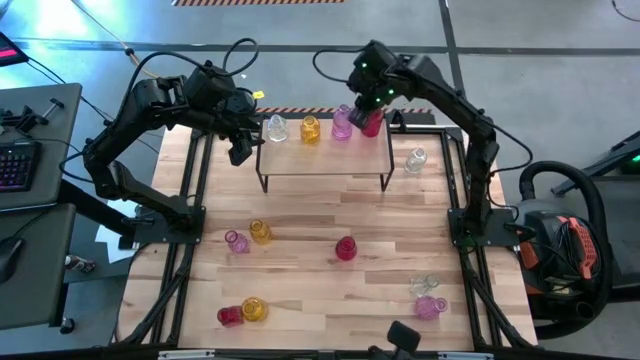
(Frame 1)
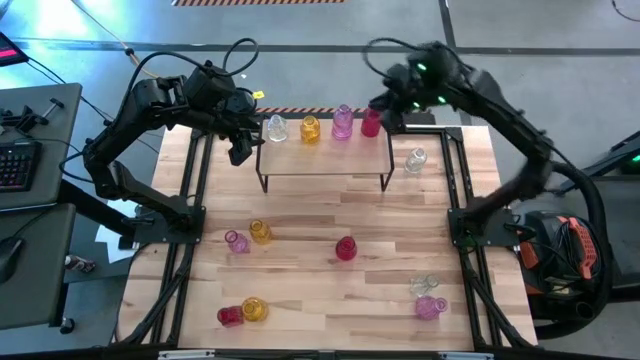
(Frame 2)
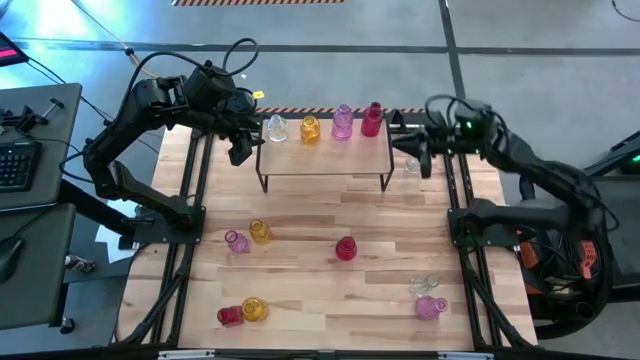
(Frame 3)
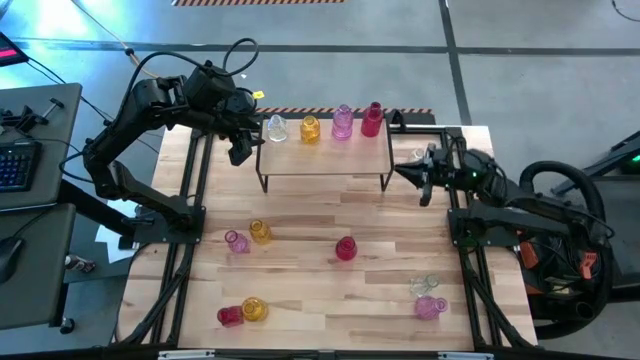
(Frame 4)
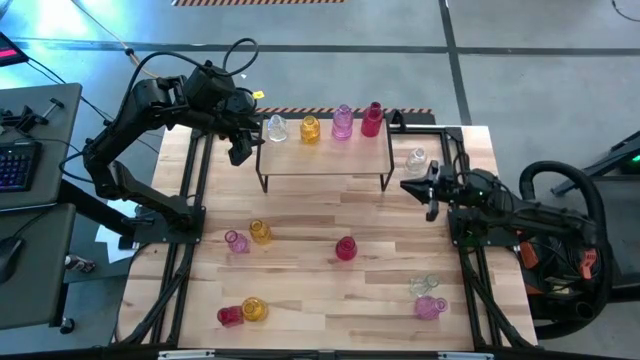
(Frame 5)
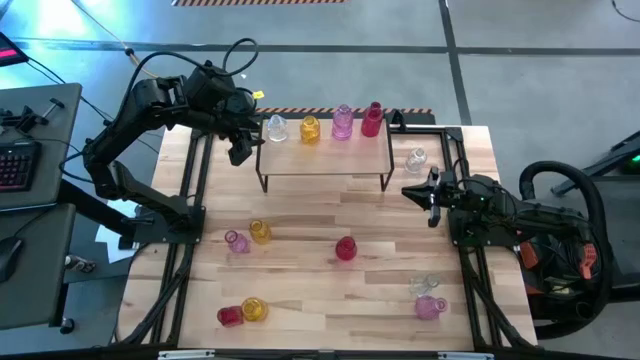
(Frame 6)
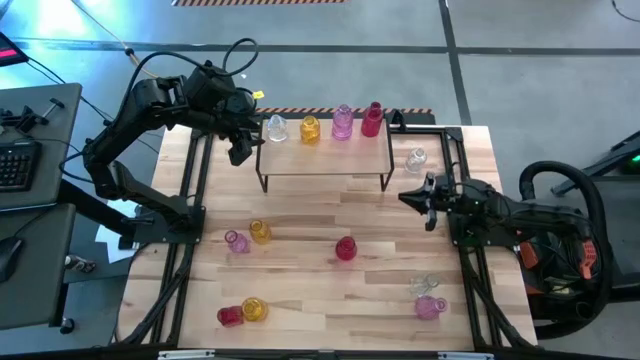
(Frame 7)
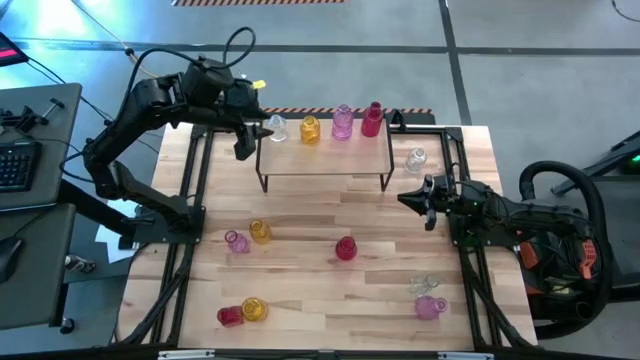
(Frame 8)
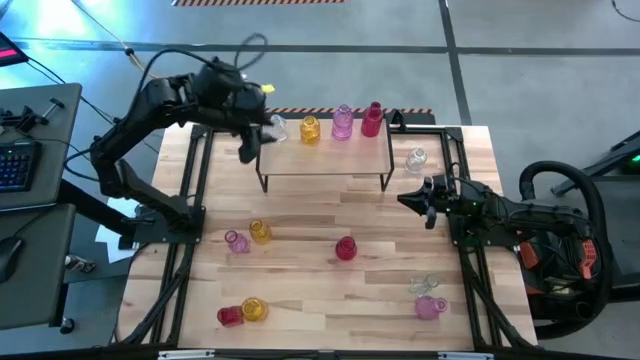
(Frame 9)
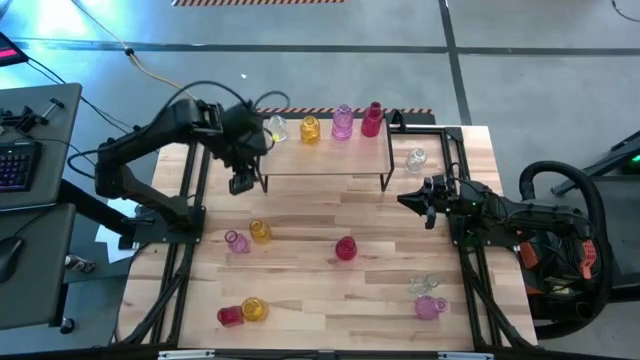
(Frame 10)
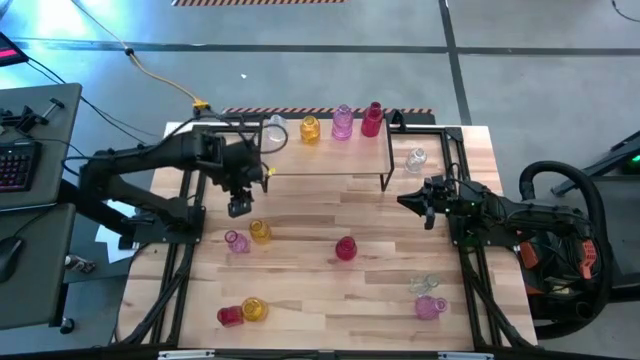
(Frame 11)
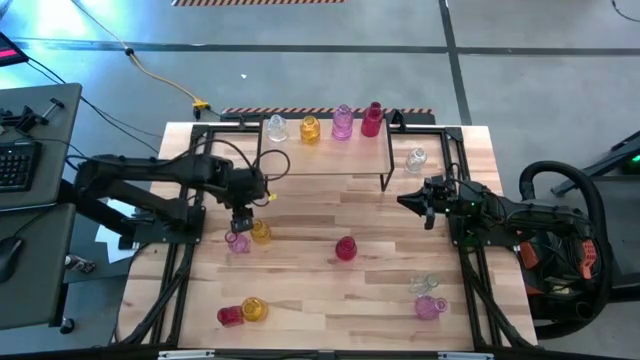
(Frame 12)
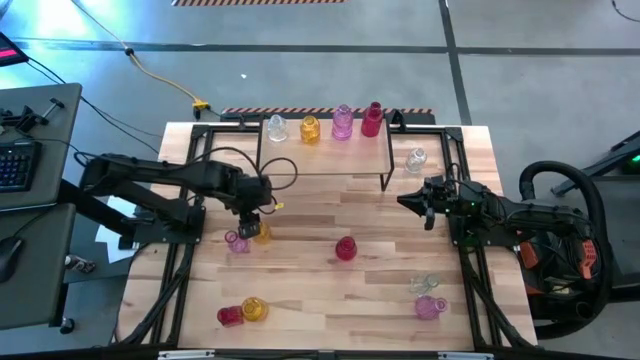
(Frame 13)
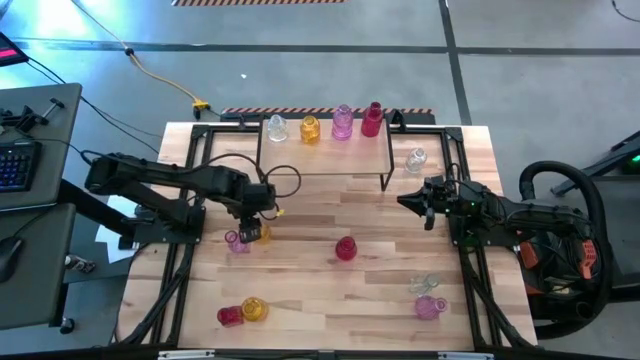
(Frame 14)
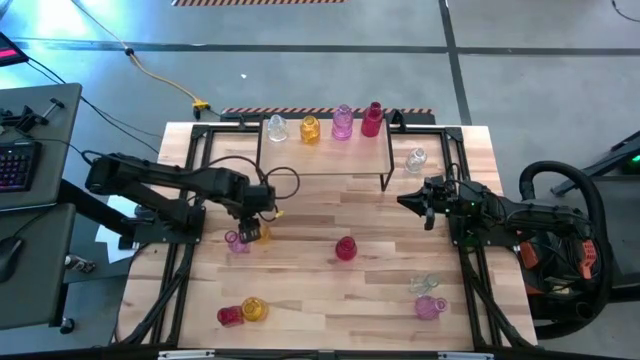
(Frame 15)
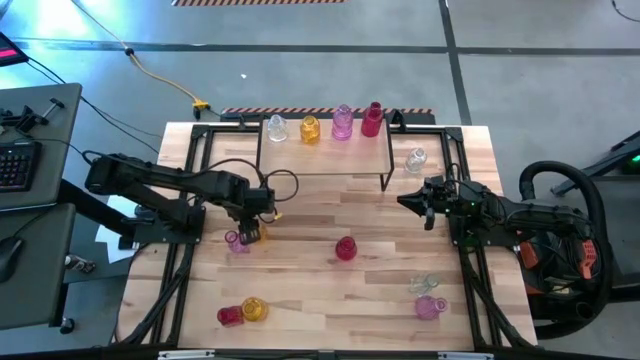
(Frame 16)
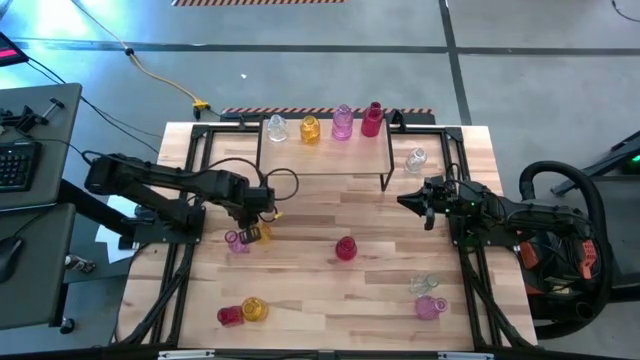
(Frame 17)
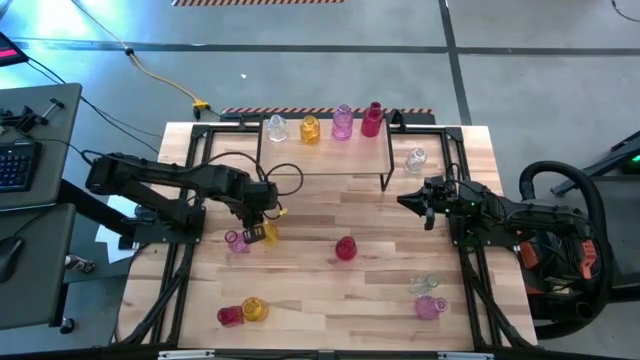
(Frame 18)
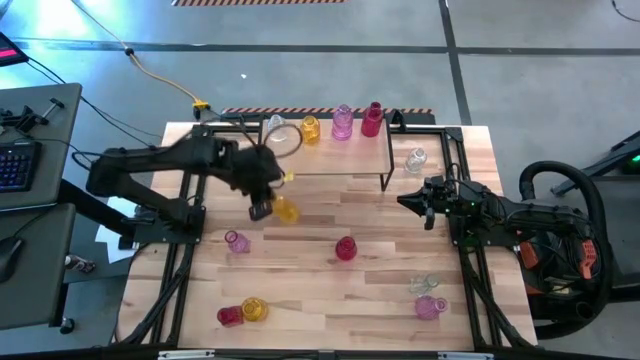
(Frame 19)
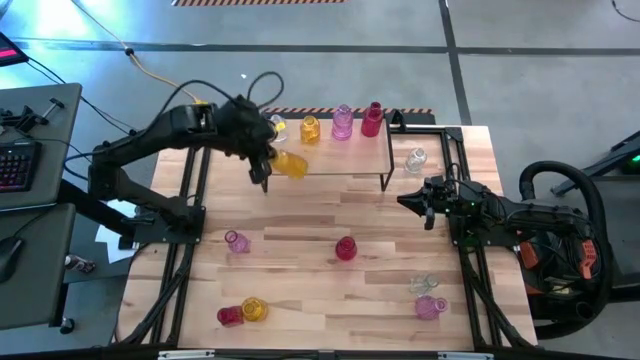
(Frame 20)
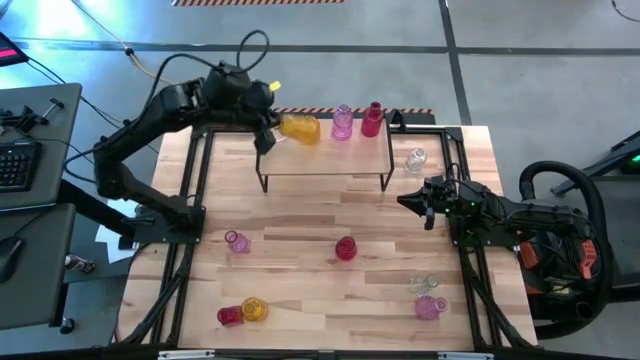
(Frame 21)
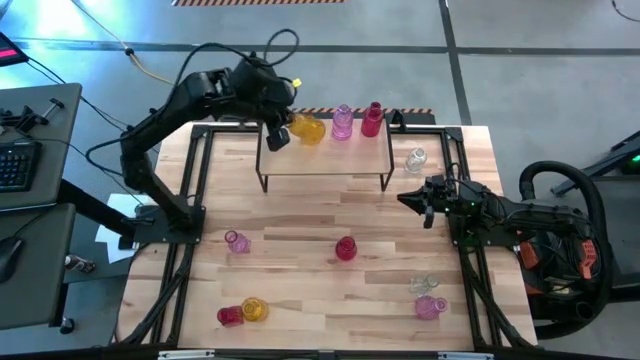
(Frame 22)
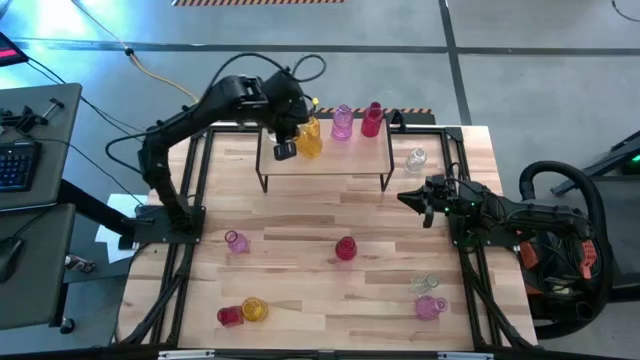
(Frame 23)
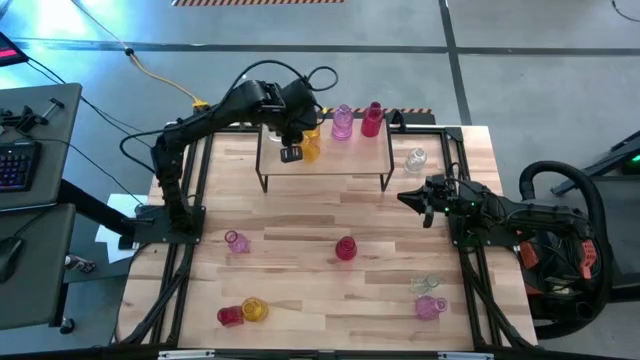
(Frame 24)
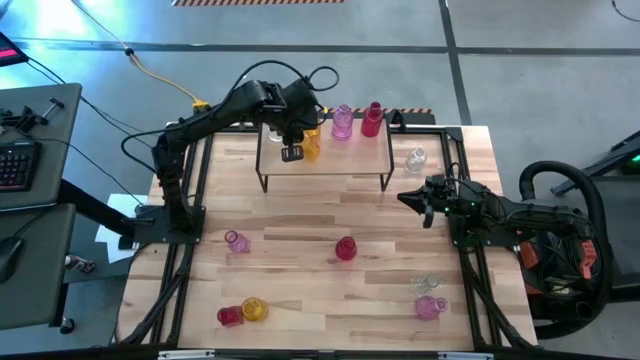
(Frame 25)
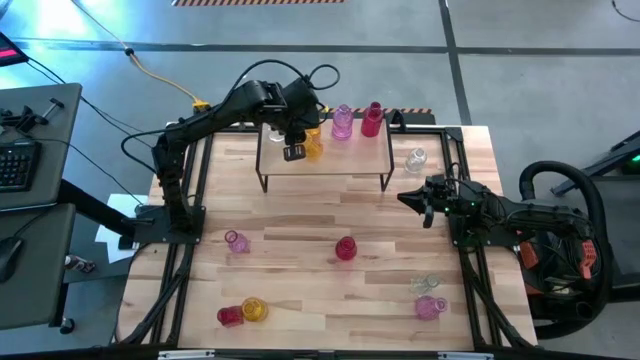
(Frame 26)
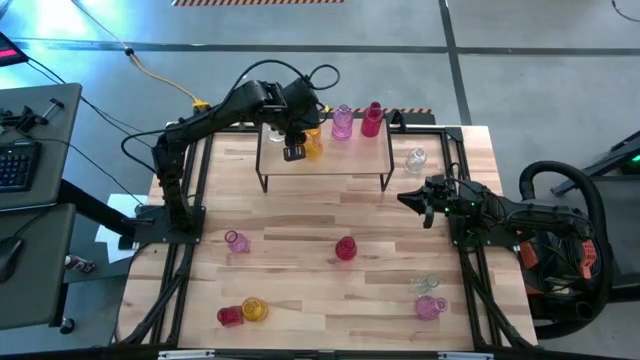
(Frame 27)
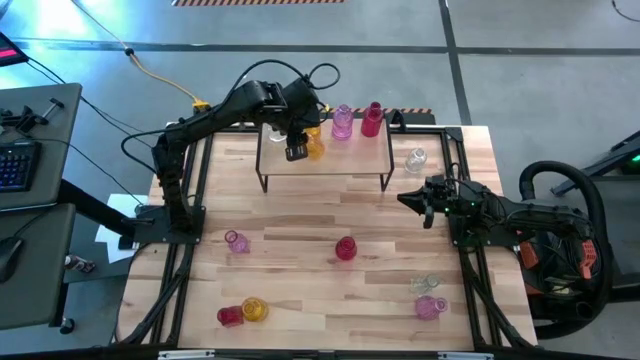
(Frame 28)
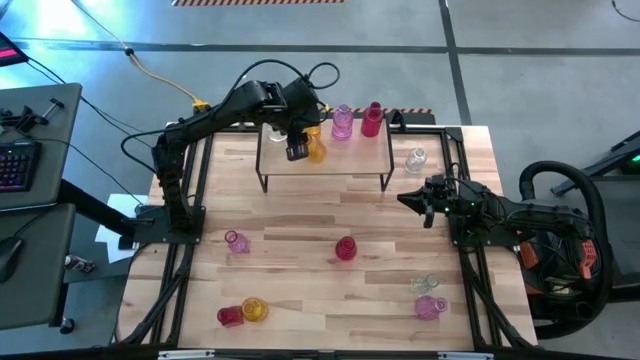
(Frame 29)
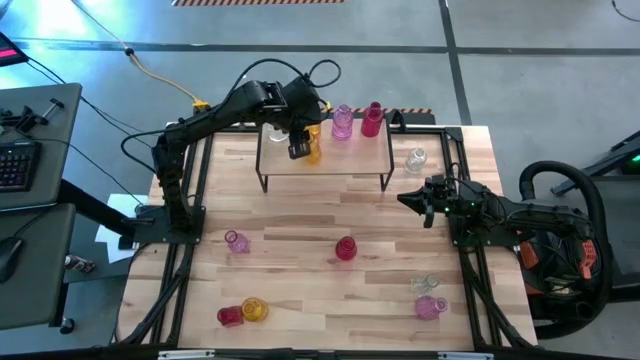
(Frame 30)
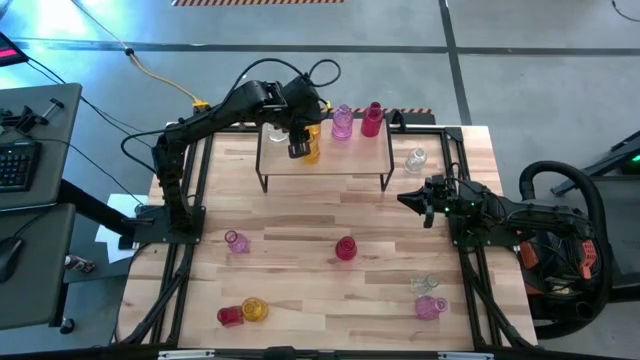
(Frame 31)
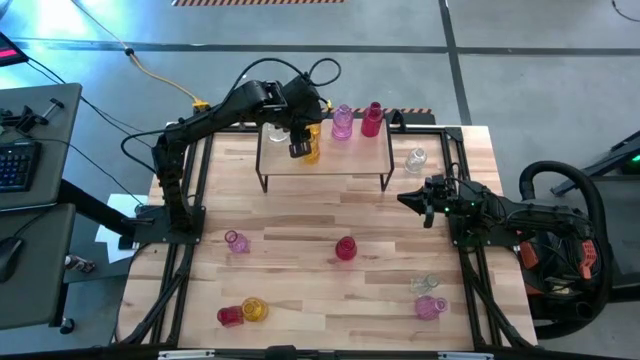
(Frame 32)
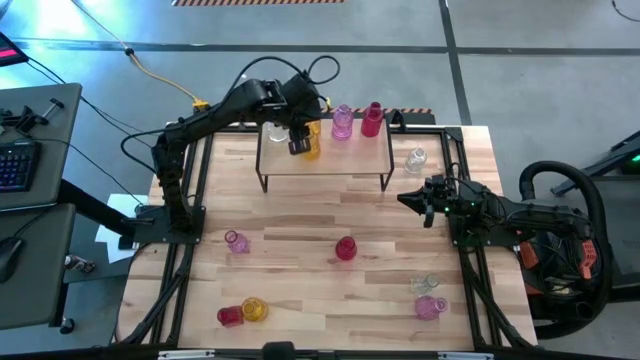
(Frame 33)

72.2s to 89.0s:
Task: sort vases onto shelf
Put the top yellow vase aligned with the other yellow vase on the shelf

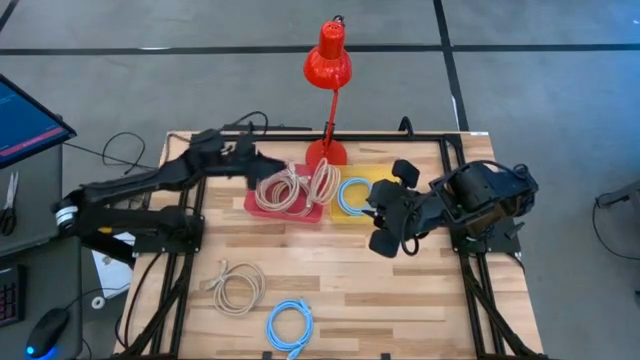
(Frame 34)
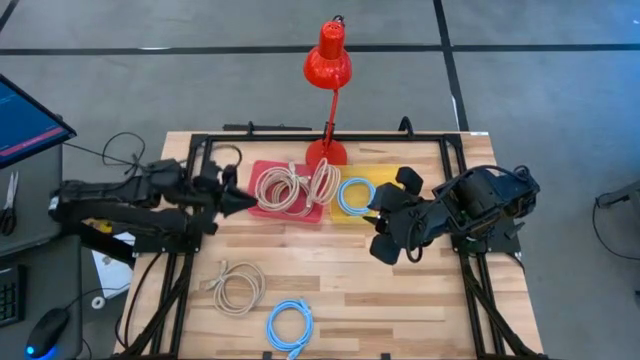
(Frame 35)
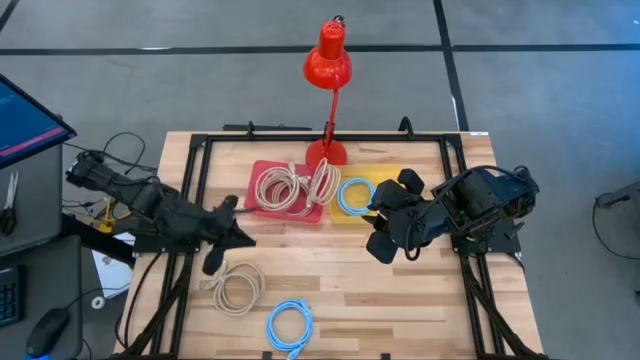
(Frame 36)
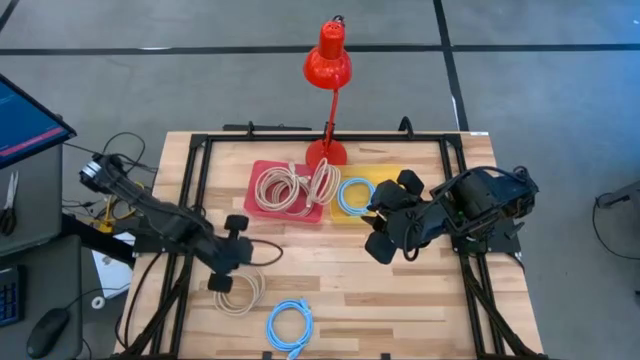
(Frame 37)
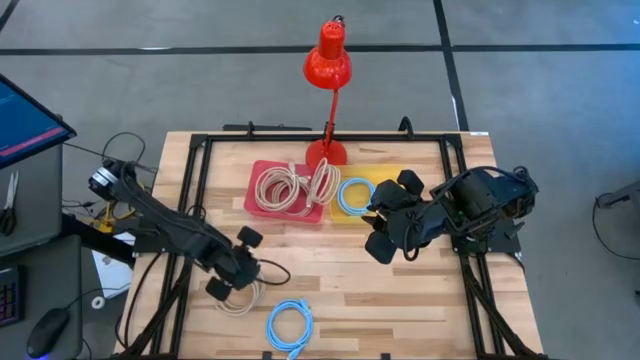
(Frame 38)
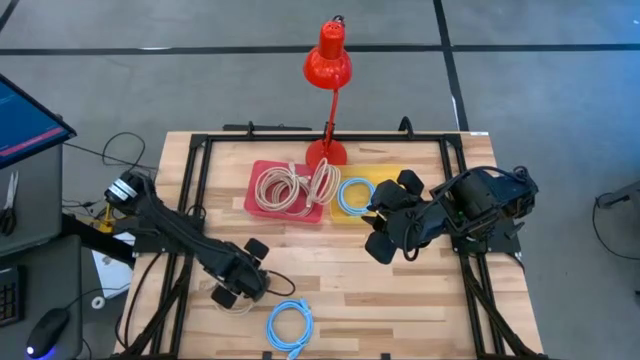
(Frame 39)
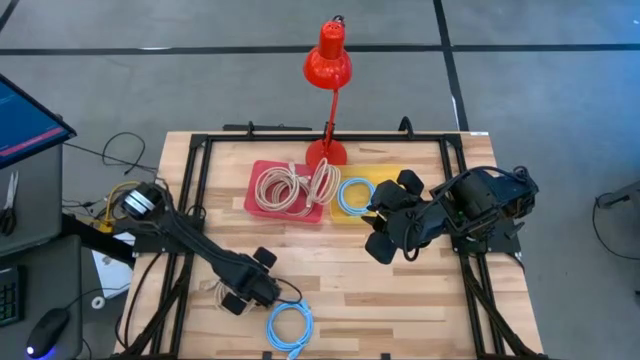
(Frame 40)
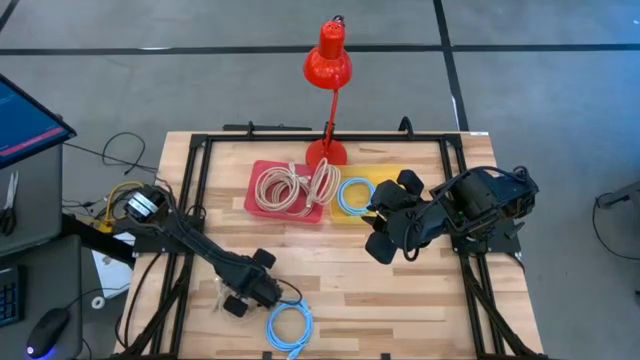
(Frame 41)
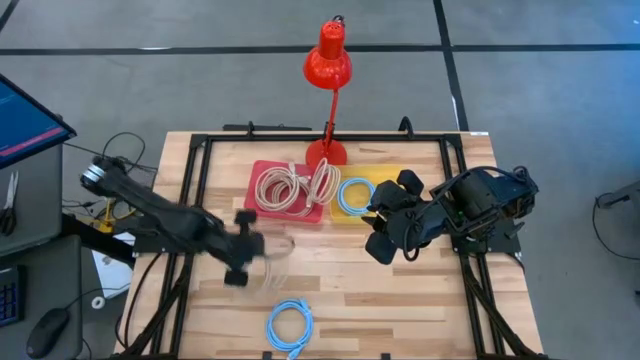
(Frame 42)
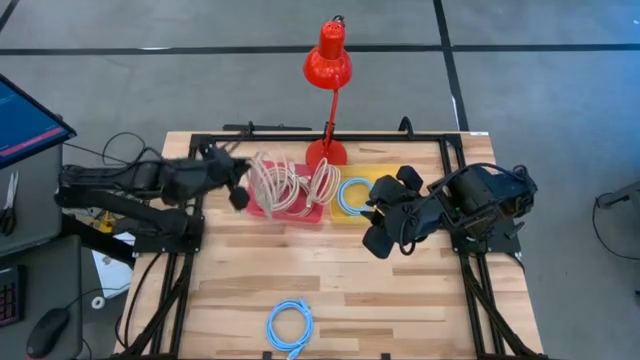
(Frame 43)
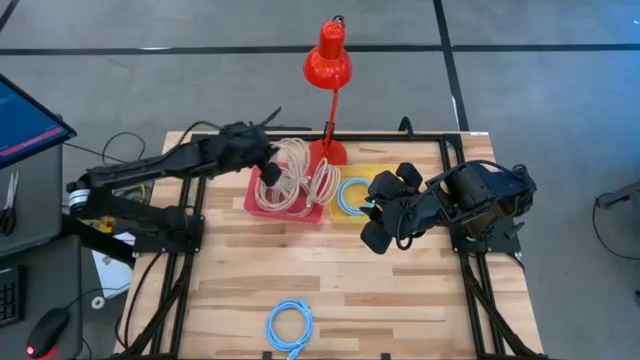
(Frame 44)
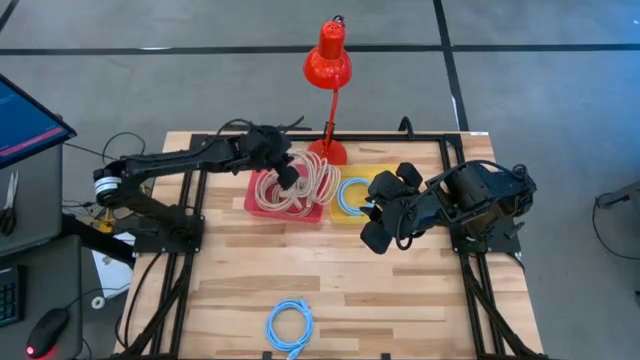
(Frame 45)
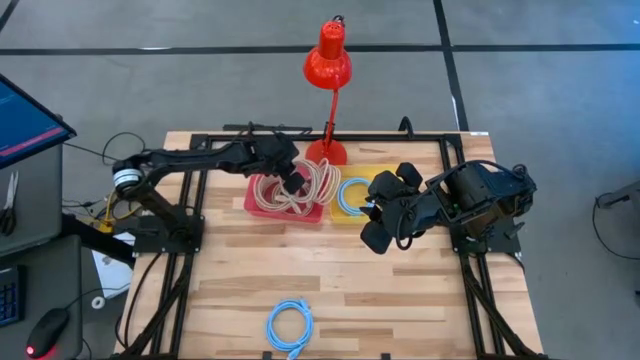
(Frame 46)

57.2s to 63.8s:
Task: Sort HDMI cables
Put the brown HDMI cable into the red bin
